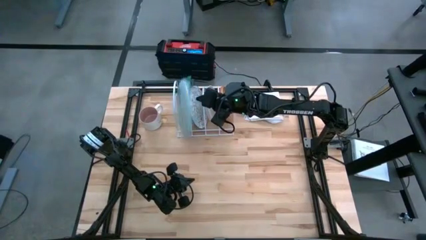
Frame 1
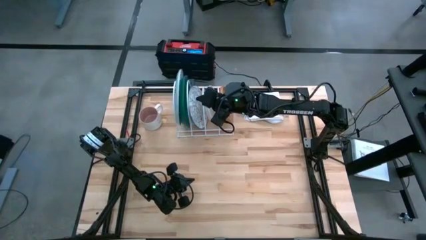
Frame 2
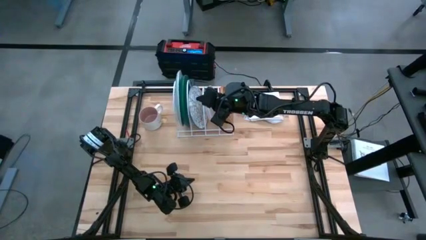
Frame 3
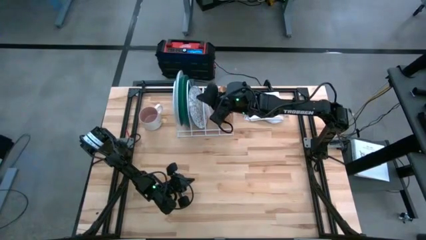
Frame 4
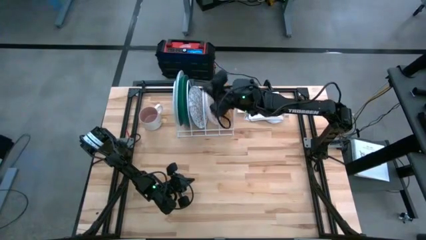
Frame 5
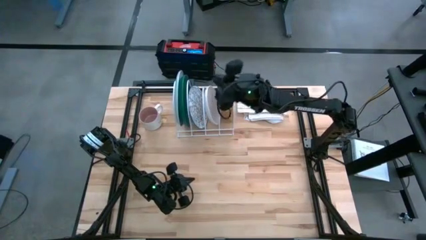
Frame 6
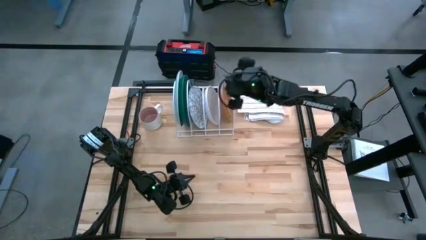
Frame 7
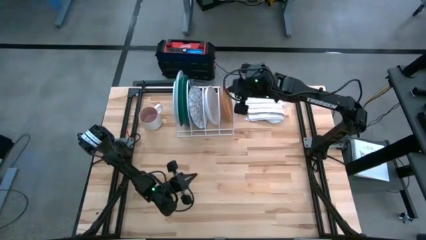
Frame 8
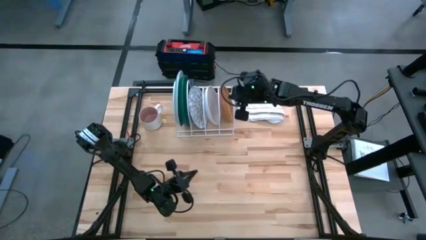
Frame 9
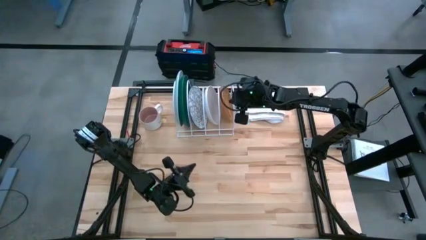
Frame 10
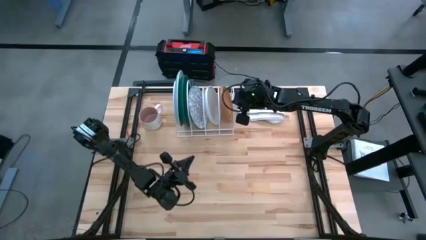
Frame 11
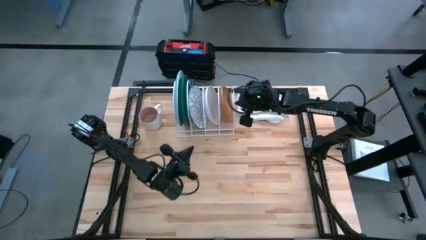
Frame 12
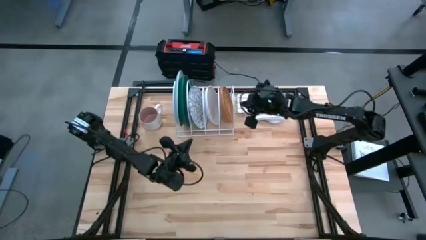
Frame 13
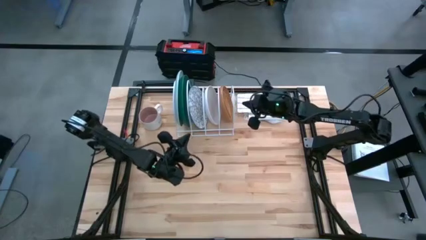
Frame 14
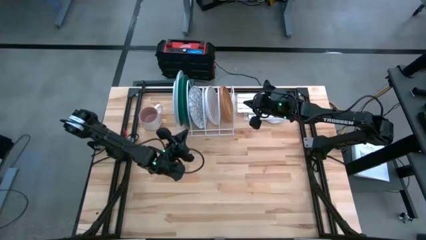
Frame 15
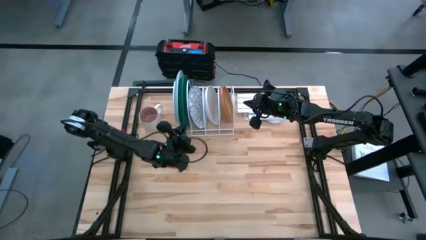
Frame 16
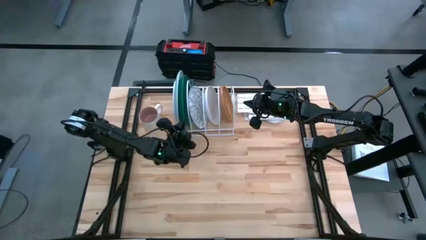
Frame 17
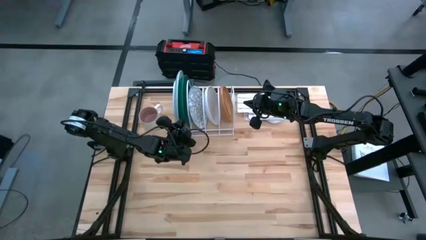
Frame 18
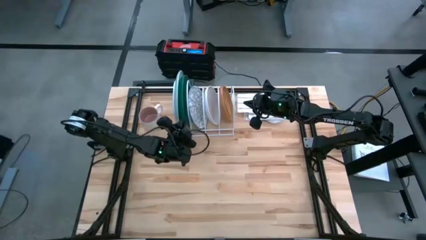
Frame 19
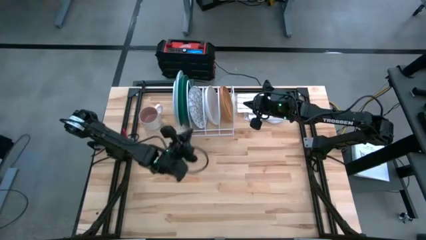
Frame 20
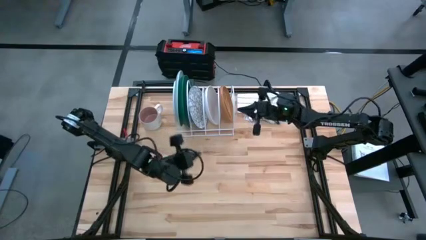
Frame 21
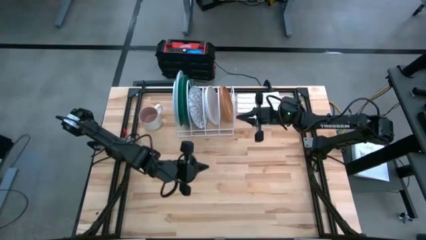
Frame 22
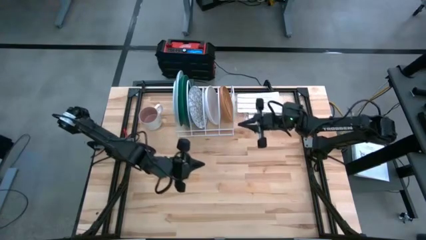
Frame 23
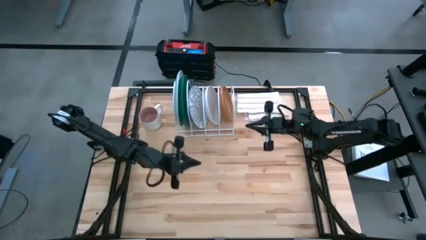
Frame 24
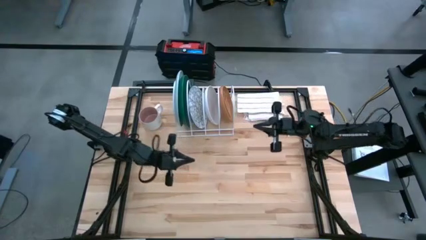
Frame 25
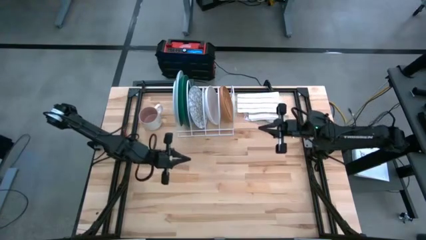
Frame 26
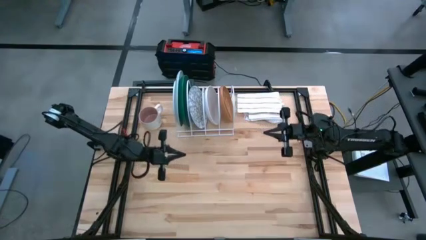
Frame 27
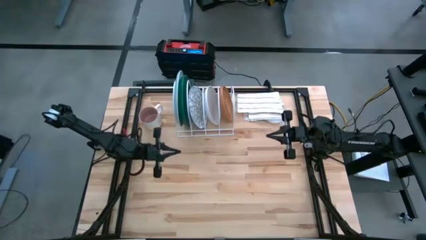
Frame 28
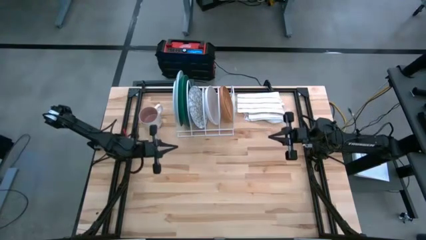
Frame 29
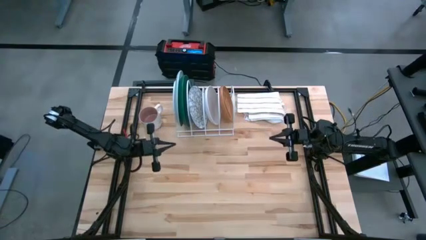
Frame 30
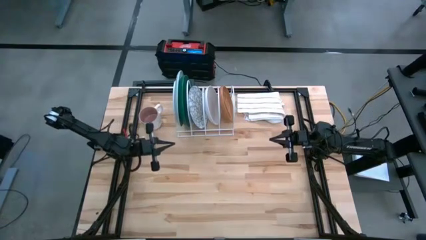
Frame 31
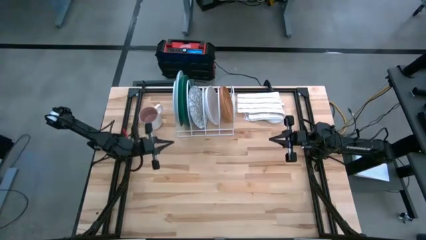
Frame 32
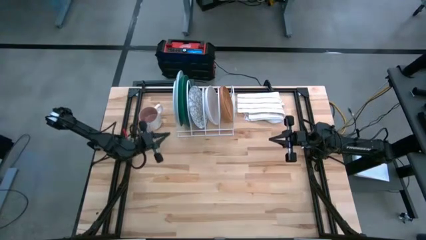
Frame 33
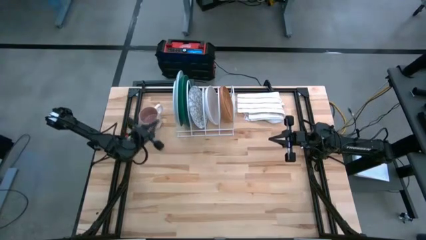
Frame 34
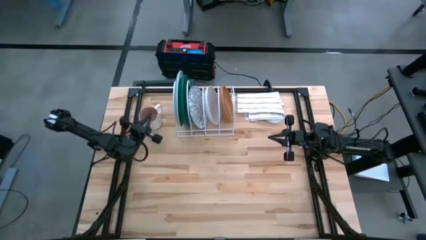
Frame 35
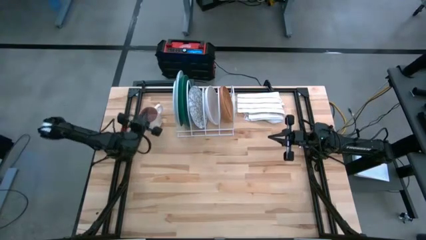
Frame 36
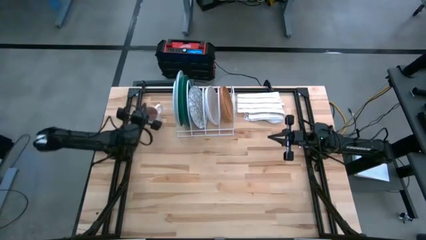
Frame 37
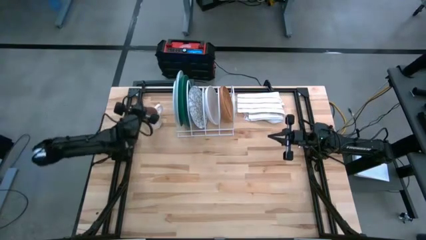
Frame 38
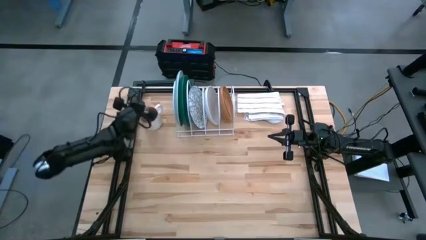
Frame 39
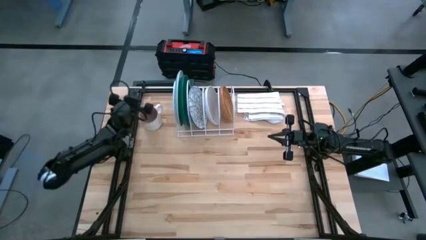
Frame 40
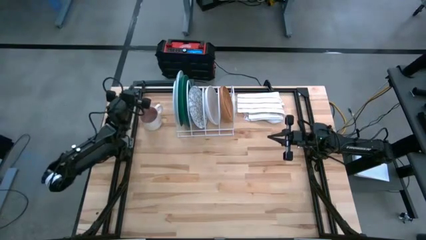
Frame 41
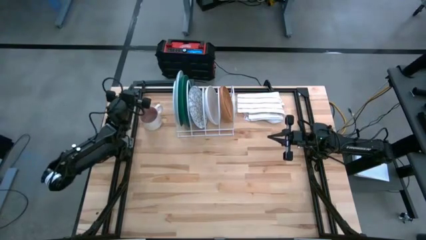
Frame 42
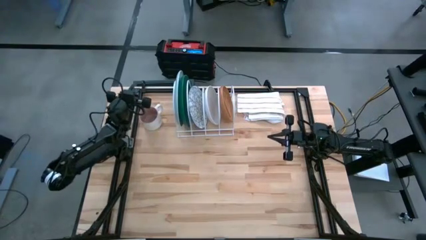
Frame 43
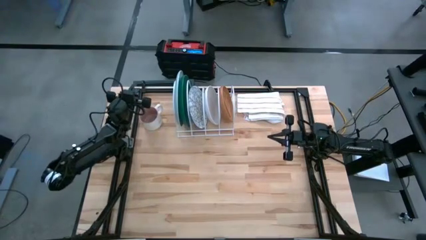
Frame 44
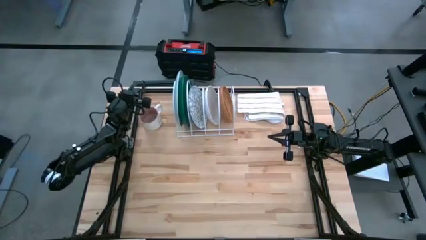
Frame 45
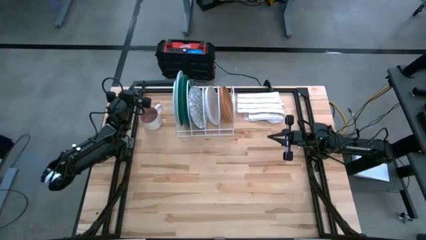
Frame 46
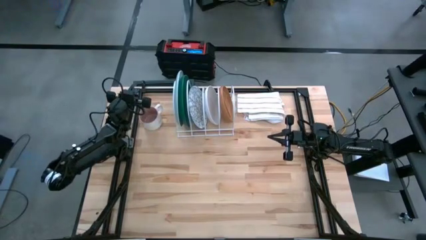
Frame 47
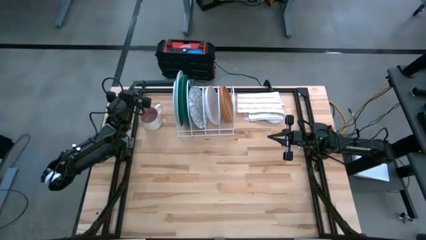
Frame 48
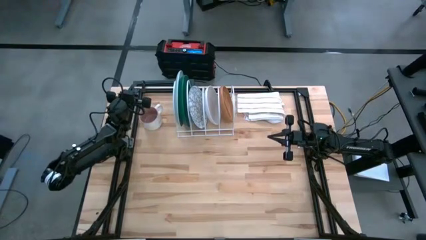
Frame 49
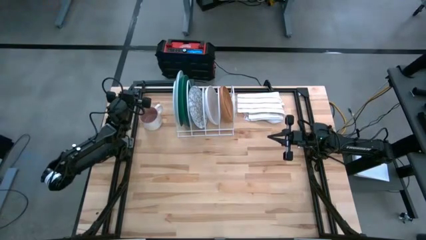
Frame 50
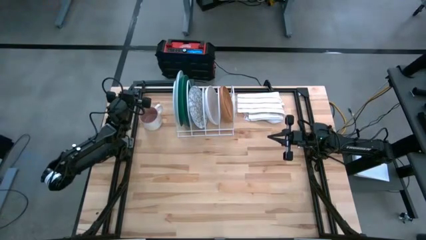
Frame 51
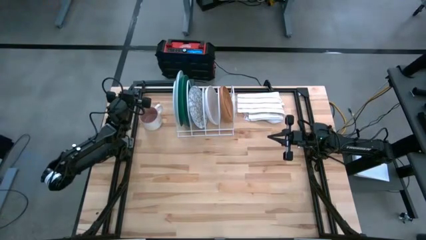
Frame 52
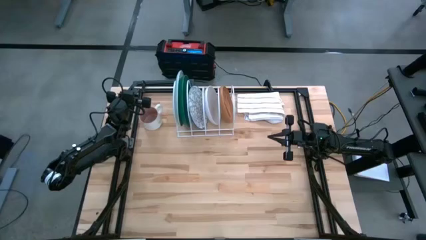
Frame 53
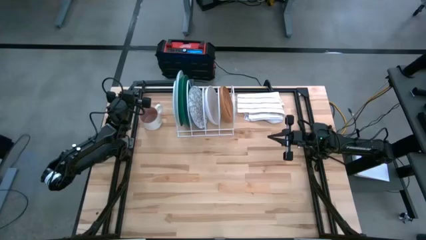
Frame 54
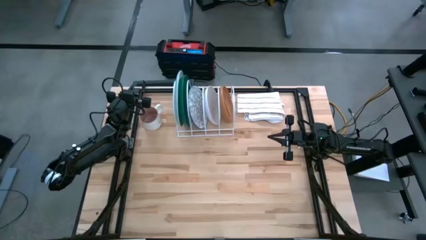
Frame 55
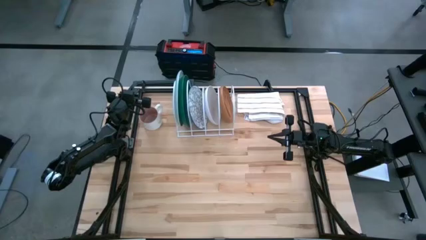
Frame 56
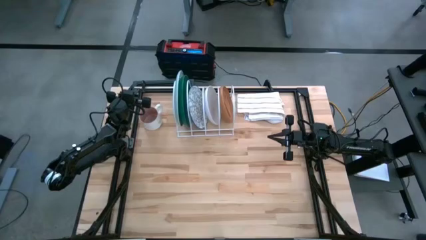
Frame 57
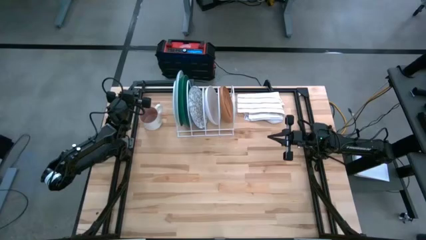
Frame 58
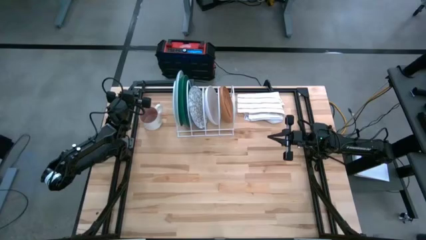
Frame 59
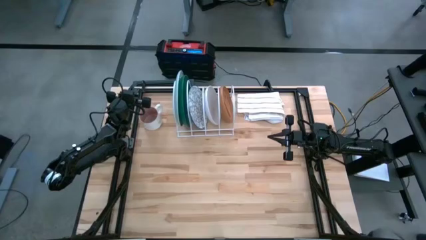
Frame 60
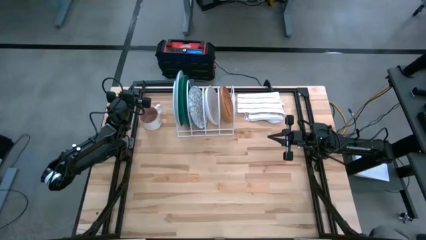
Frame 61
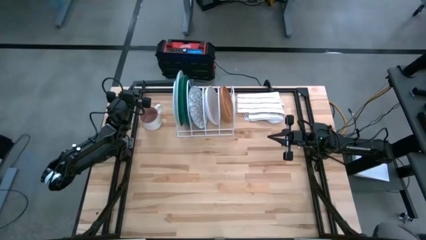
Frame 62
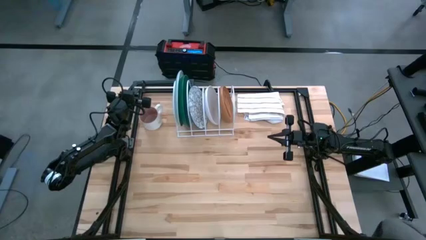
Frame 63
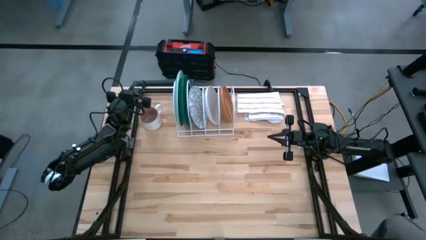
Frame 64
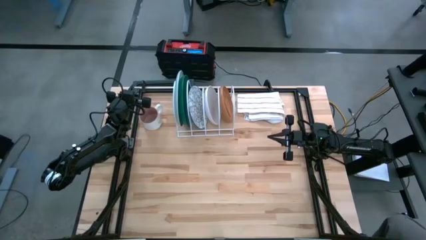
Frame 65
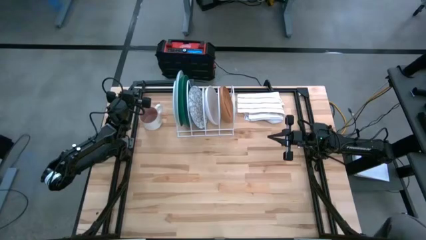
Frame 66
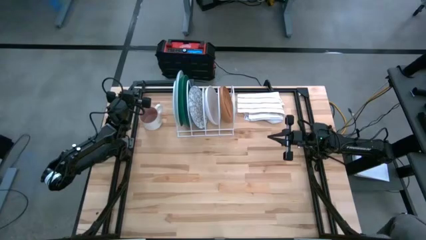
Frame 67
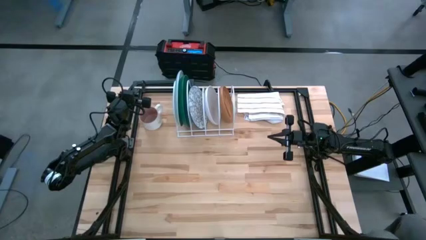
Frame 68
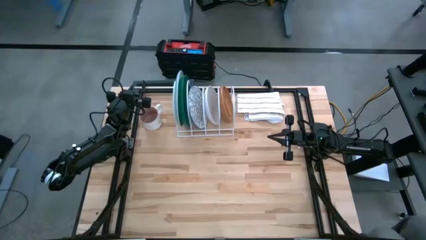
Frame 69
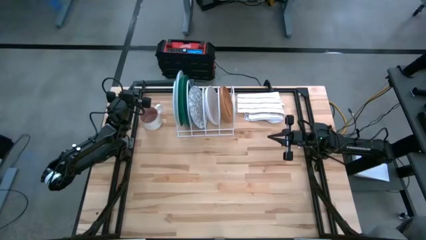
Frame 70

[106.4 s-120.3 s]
Task: Sort dishes
Return to Home Position
